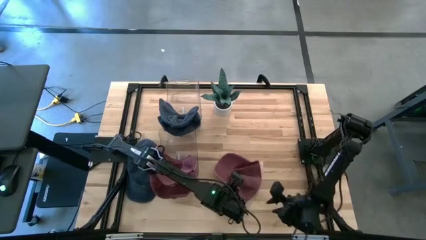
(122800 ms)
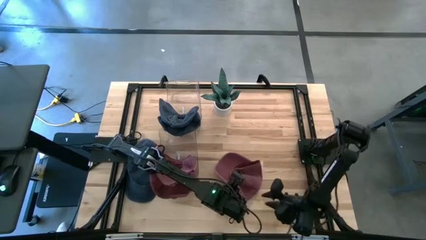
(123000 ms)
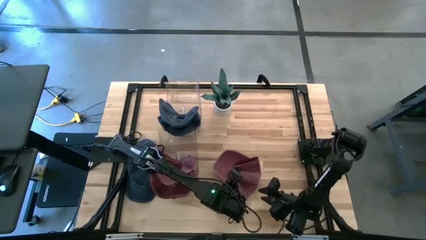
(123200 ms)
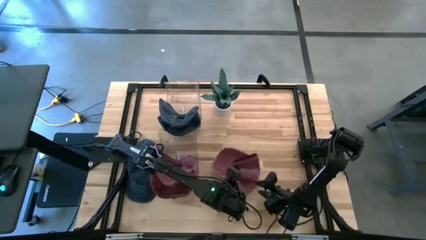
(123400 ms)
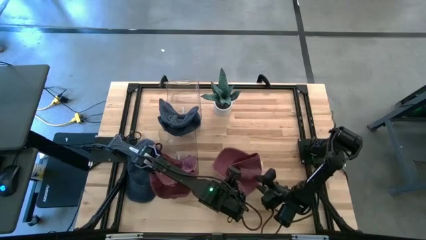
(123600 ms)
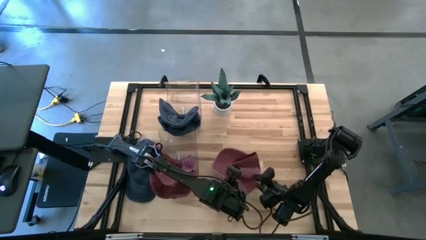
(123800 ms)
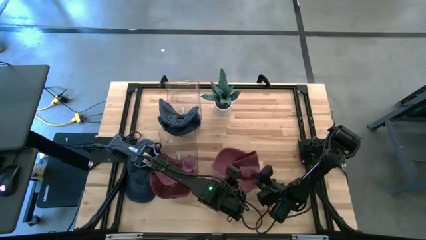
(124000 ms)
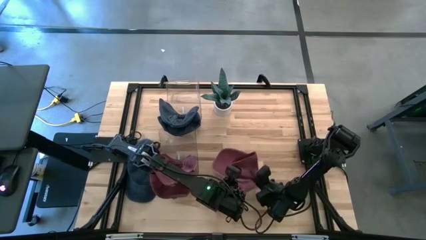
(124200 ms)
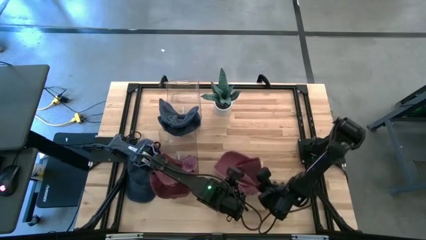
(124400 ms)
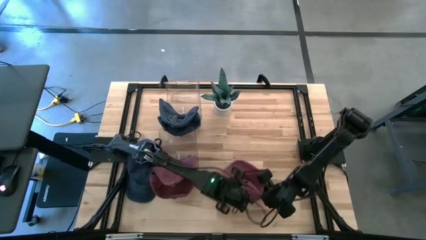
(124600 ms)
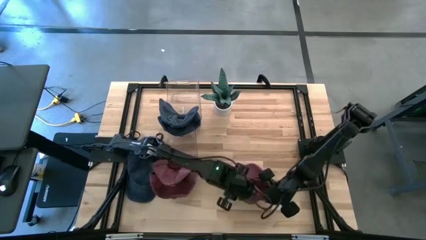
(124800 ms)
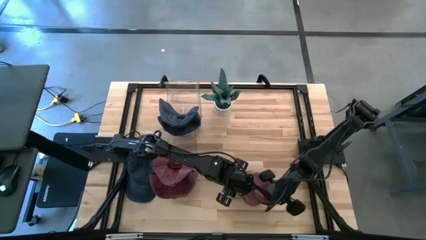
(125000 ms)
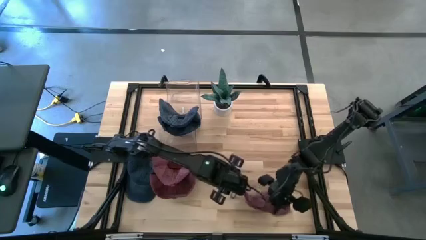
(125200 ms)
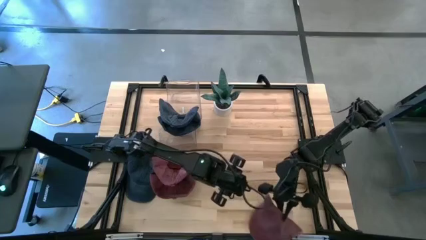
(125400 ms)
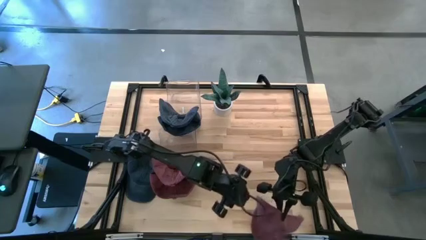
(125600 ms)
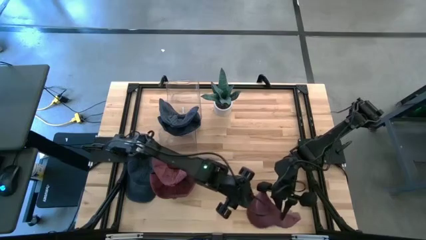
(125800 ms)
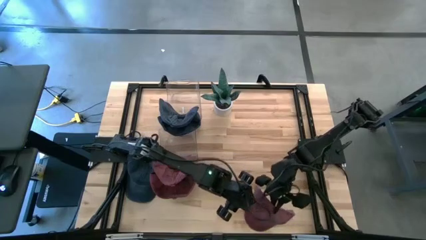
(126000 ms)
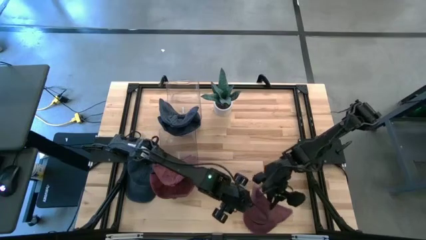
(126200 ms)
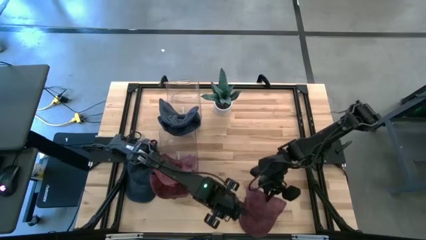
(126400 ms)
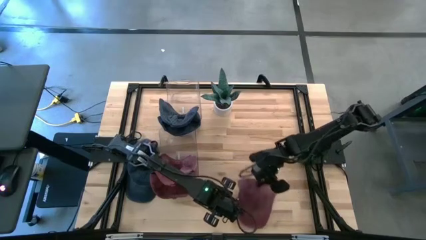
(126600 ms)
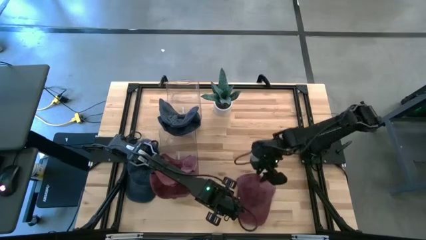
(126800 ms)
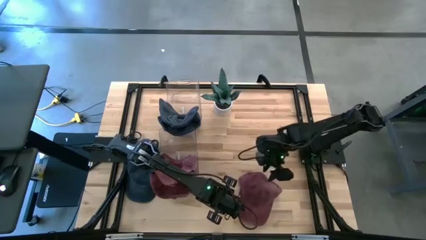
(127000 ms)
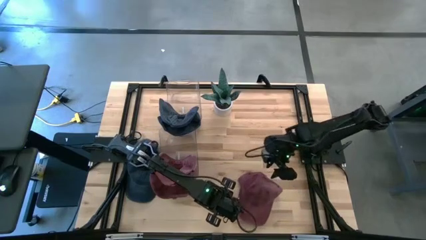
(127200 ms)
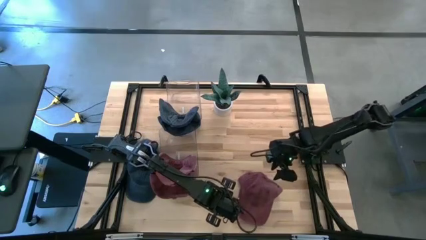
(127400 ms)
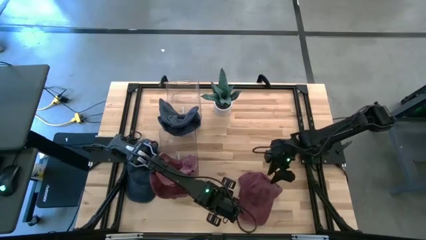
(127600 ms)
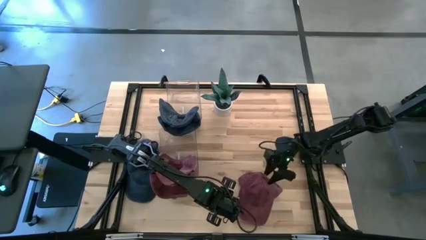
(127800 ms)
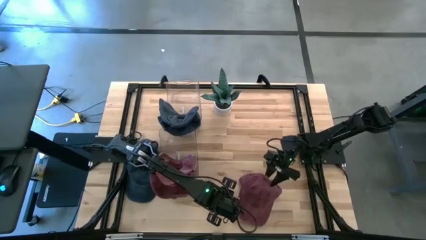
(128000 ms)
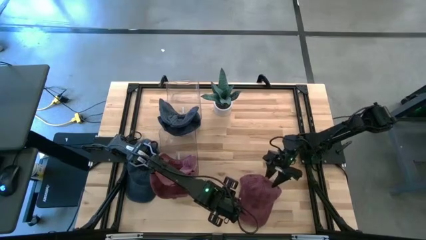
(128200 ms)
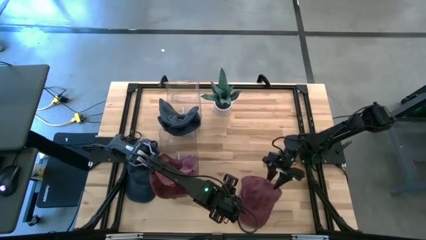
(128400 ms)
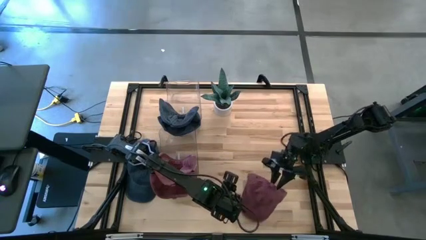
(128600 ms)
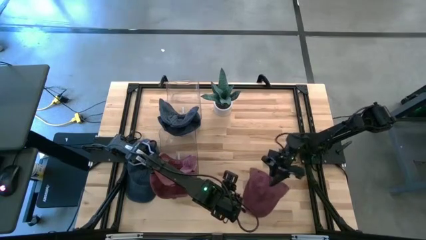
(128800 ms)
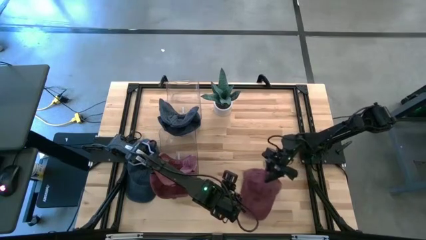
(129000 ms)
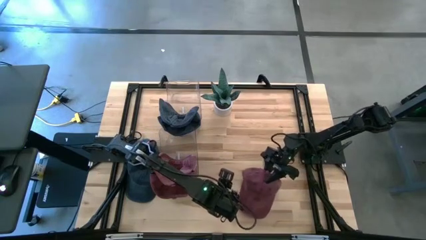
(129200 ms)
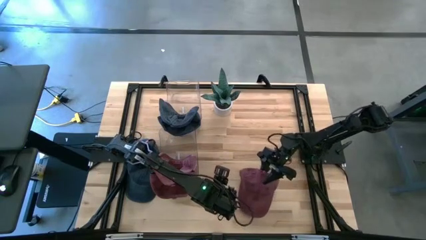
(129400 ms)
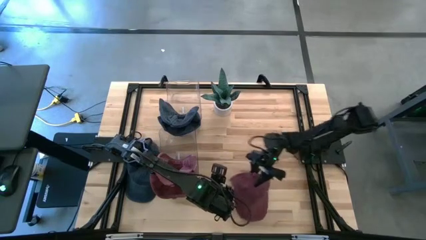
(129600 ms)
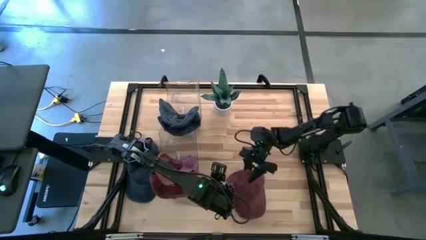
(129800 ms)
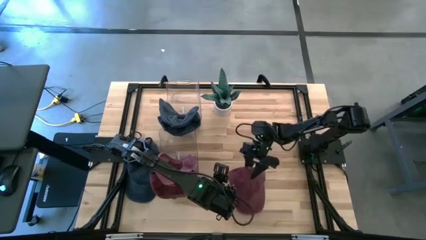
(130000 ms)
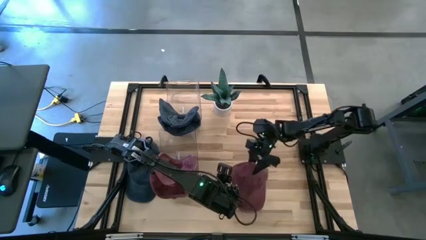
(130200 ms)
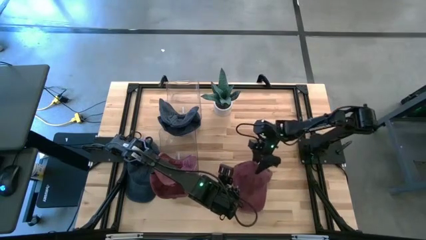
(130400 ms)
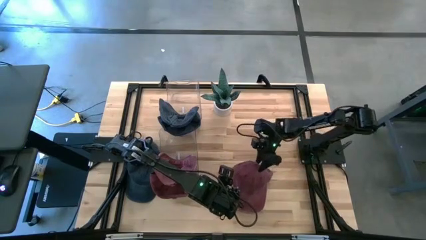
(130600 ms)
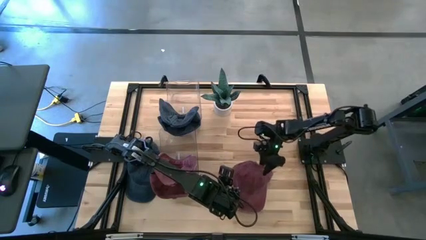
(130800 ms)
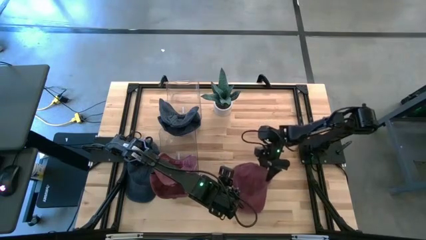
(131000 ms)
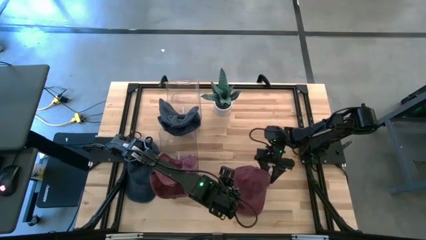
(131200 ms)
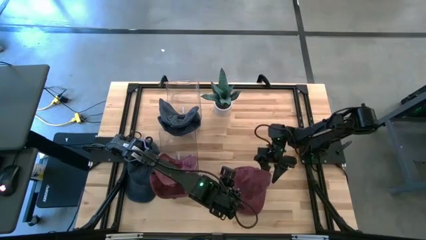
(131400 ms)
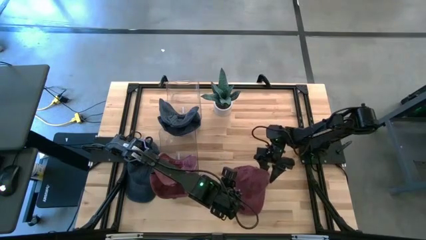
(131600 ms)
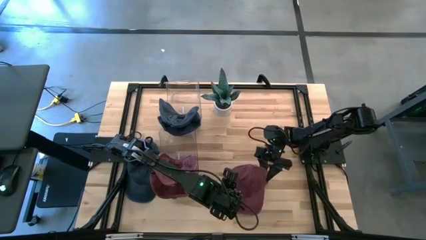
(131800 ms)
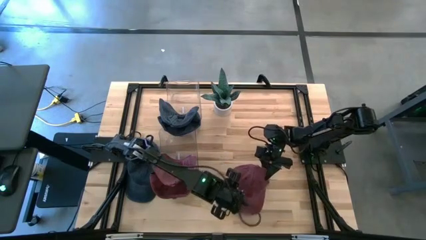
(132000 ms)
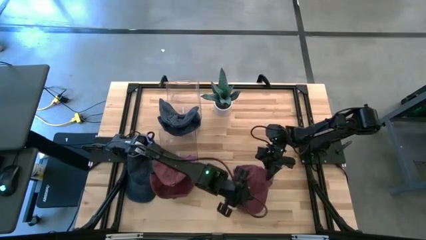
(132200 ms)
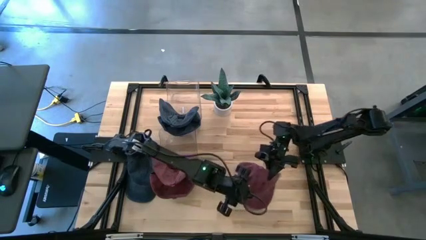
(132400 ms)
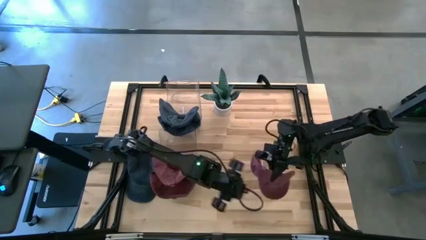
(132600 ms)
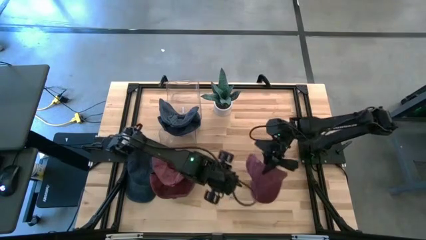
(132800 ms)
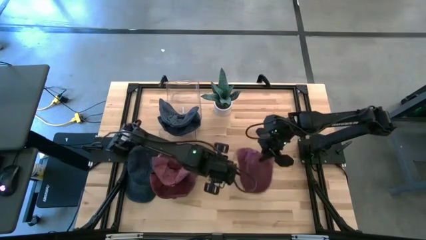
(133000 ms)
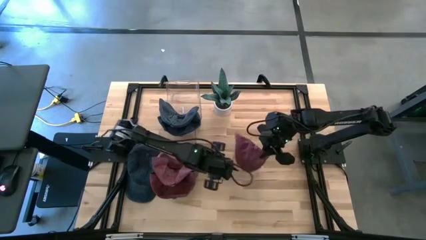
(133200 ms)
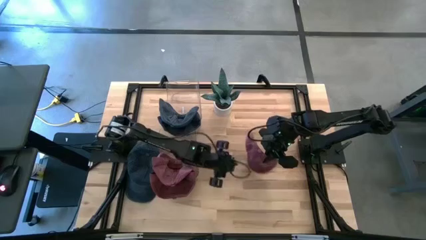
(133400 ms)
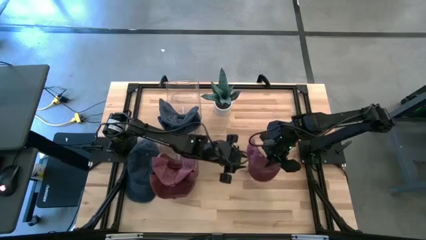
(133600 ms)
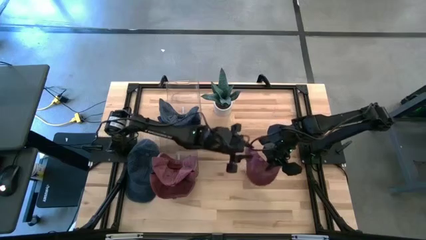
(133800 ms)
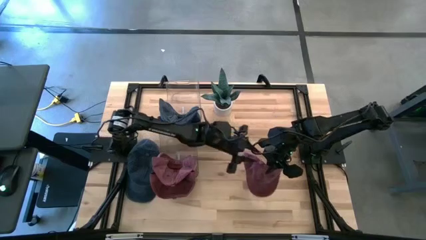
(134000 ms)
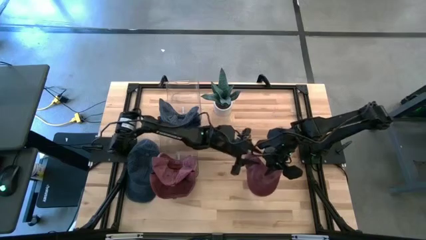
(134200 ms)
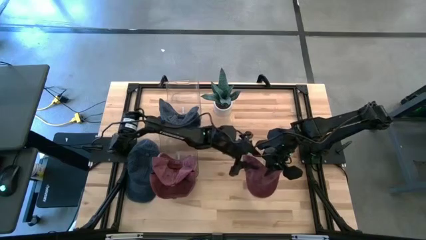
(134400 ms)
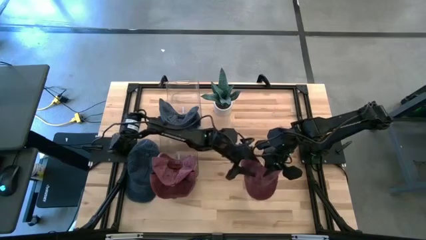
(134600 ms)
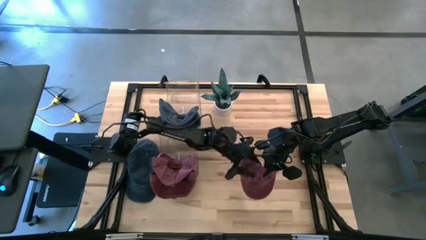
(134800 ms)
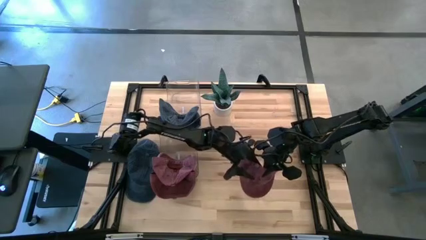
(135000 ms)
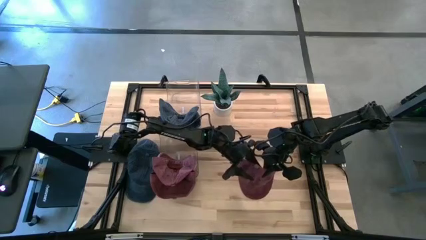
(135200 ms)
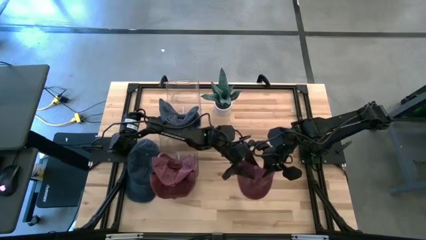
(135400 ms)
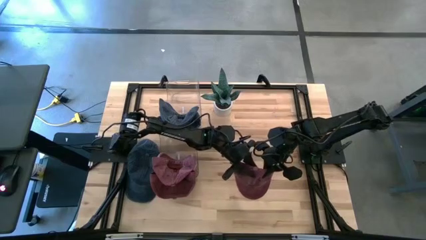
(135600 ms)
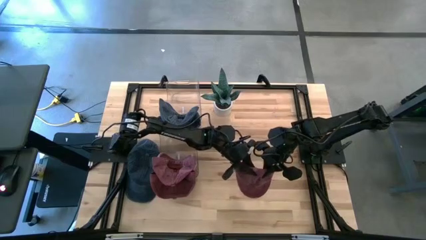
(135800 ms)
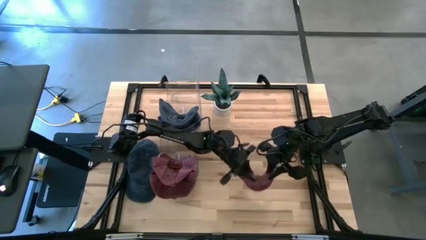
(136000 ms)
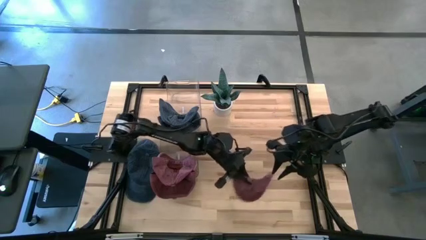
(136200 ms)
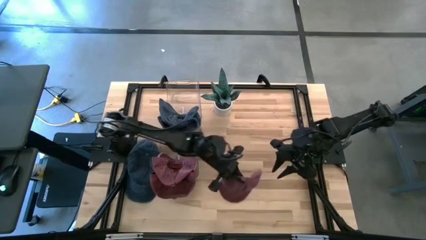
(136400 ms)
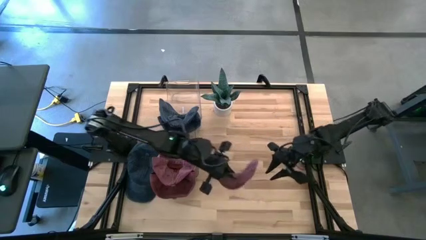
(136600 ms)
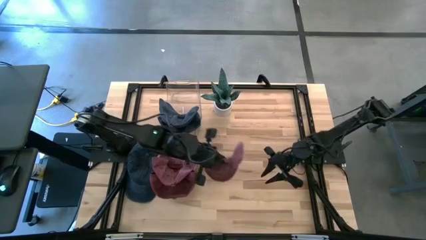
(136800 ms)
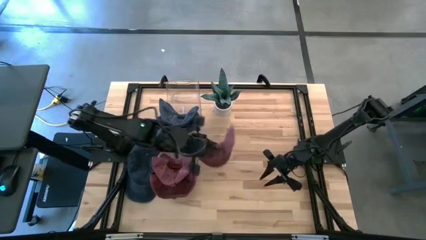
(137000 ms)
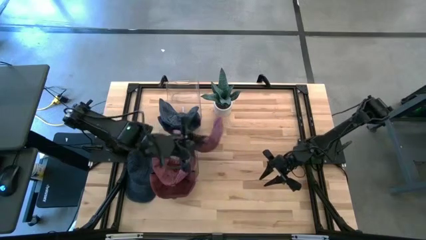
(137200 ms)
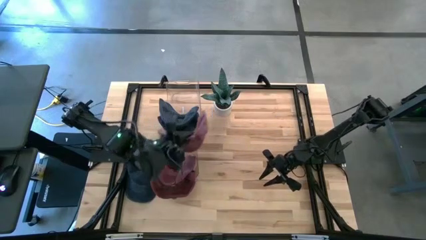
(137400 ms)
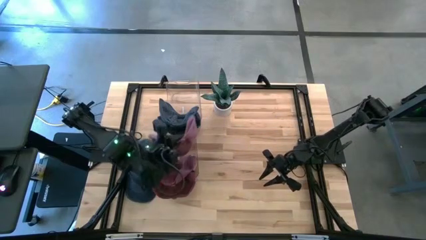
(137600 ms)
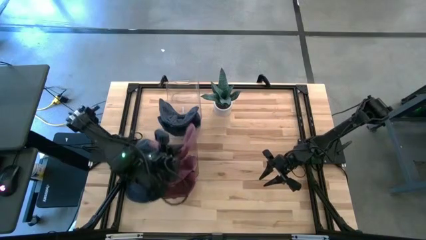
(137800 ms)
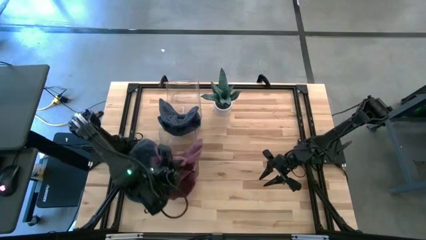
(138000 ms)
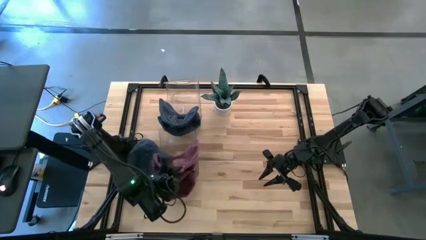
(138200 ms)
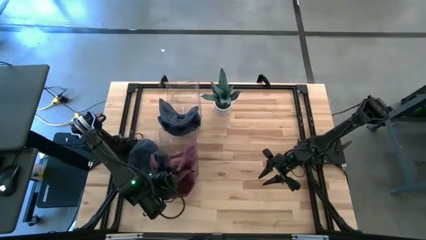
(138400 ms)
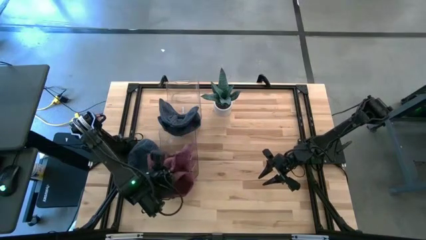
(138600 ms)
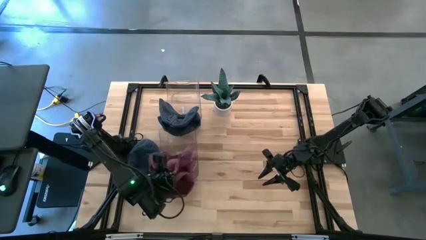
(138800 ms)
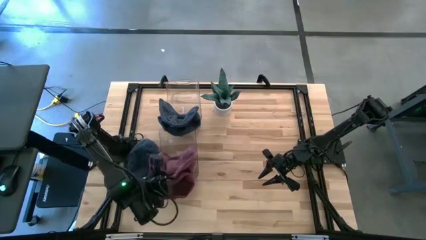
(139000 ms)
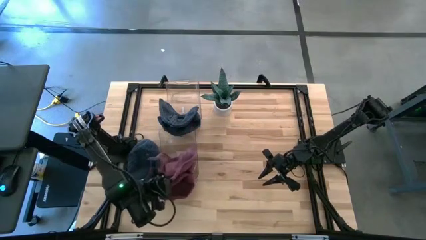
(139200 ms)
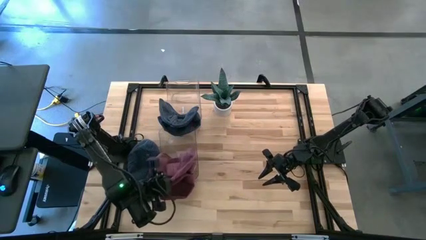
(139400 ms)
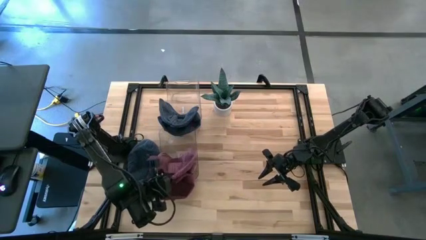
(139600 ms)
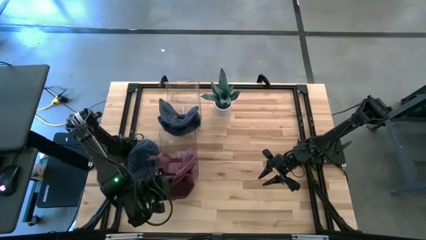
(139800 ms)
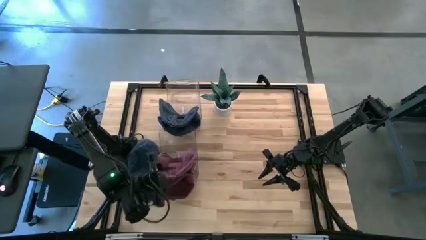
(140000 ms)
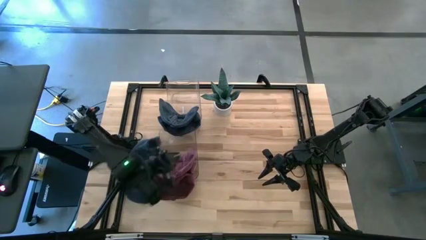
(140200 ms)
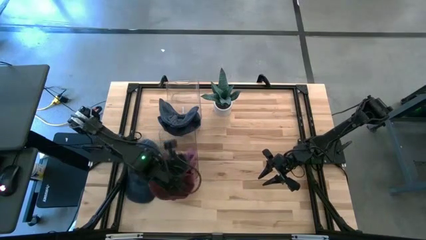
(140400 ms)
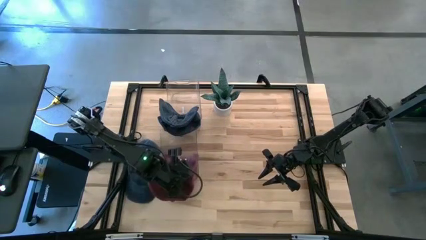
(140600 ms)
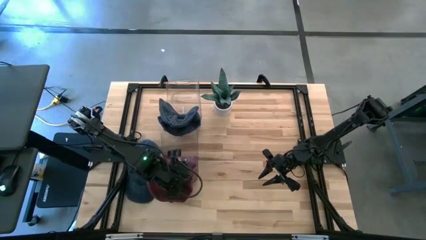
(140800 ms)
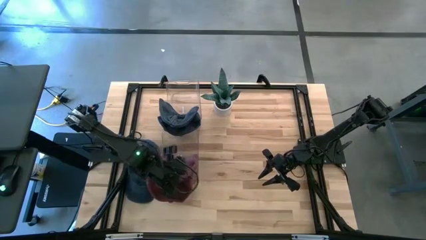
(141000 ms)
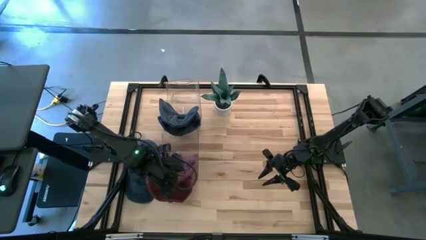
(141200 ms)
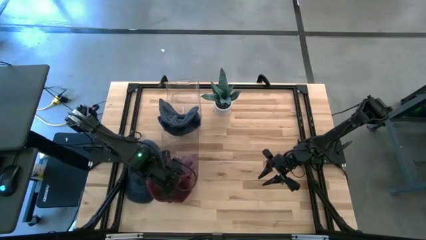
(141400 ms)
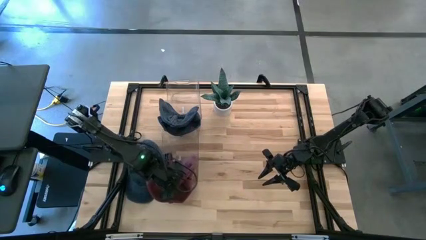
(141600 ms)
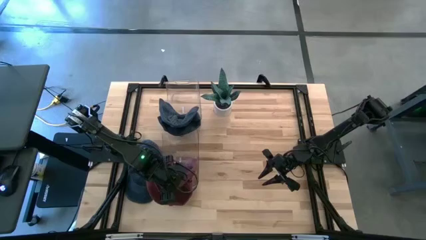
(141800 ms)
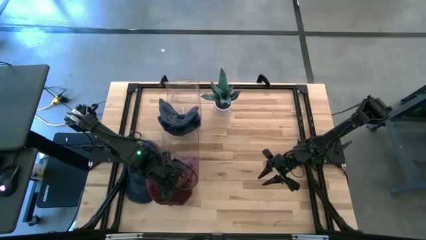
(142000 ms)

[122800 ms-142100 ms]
Task: Pick & Place hat
Put the red cap into the bottom transparent bin
